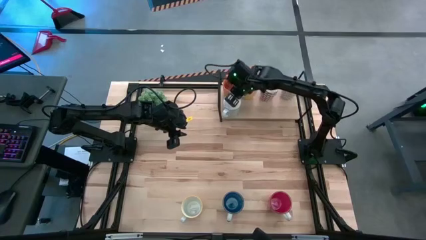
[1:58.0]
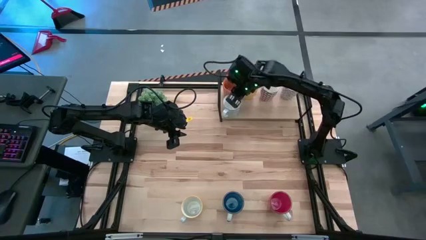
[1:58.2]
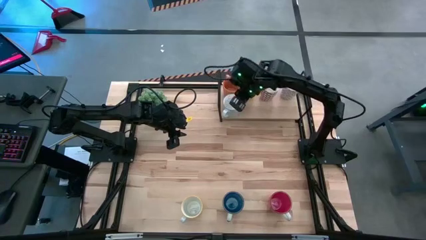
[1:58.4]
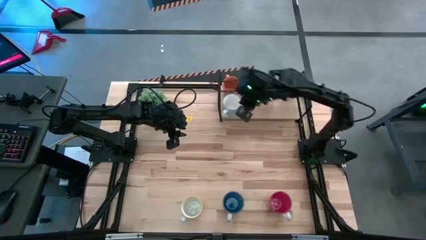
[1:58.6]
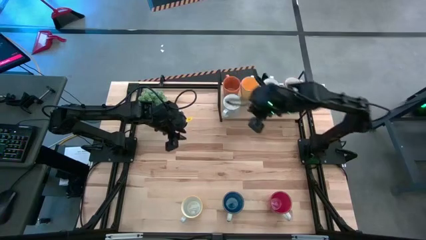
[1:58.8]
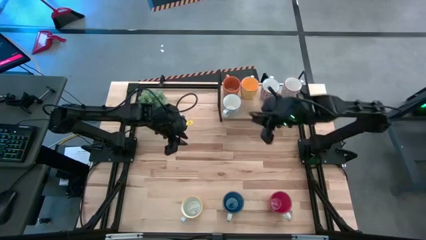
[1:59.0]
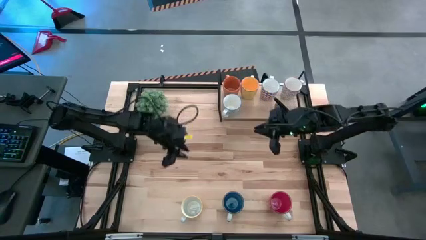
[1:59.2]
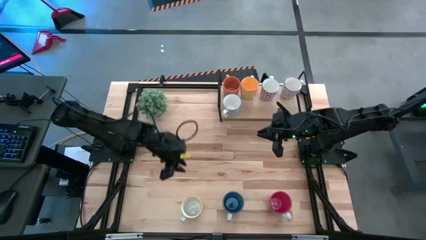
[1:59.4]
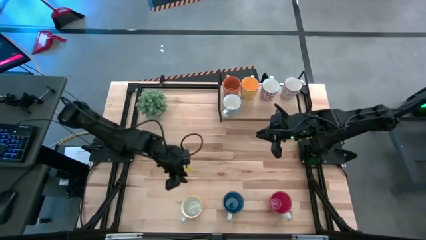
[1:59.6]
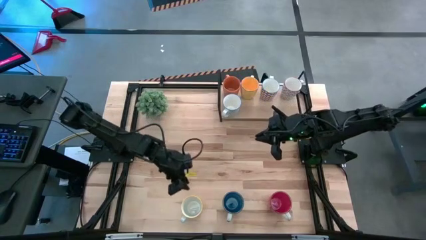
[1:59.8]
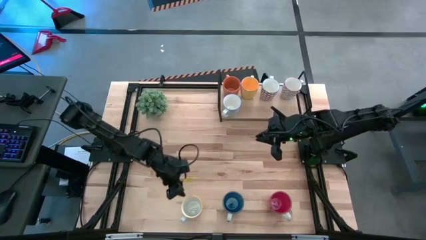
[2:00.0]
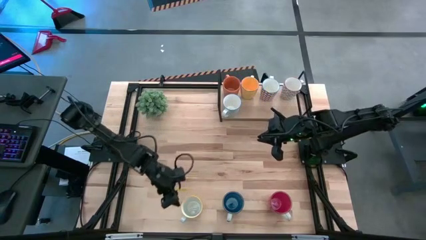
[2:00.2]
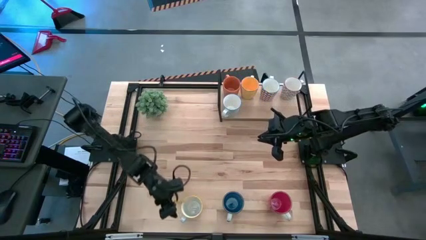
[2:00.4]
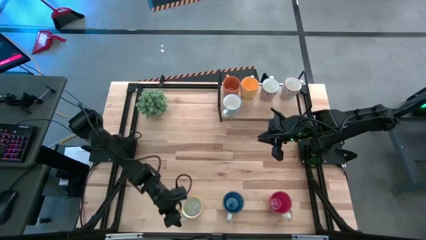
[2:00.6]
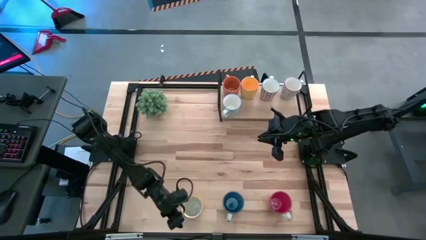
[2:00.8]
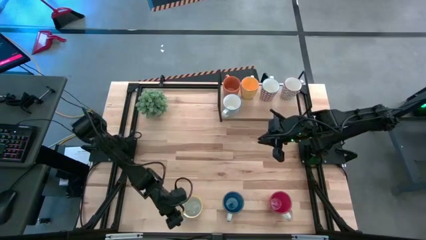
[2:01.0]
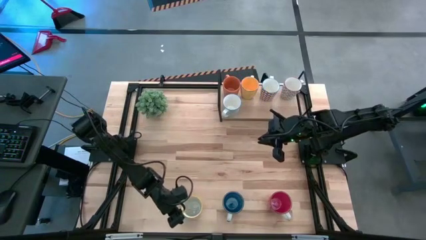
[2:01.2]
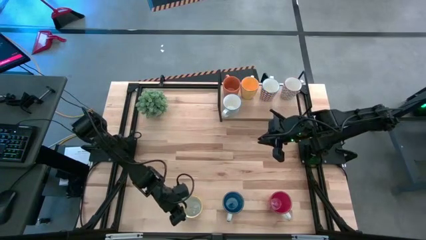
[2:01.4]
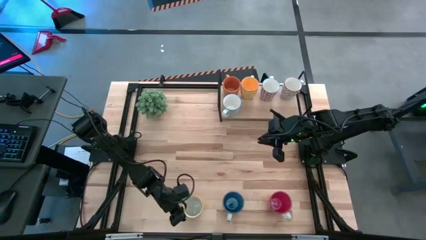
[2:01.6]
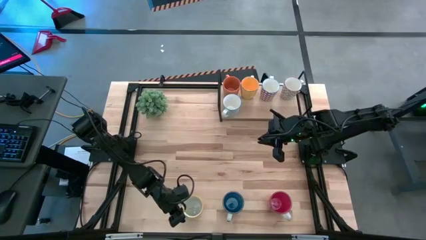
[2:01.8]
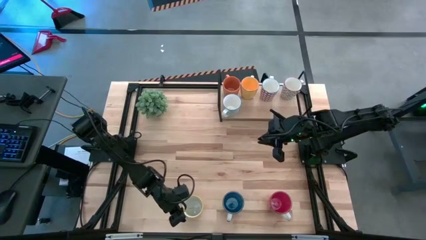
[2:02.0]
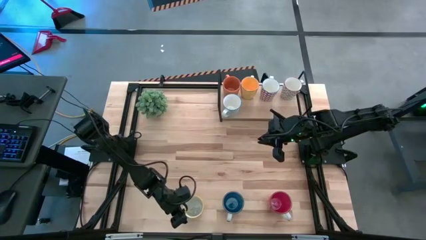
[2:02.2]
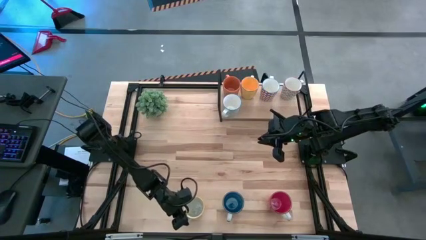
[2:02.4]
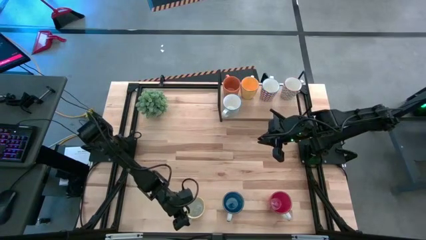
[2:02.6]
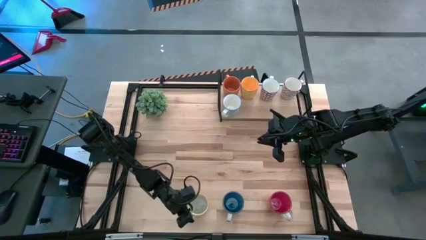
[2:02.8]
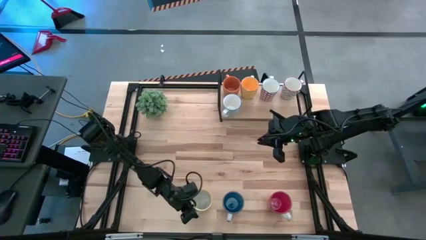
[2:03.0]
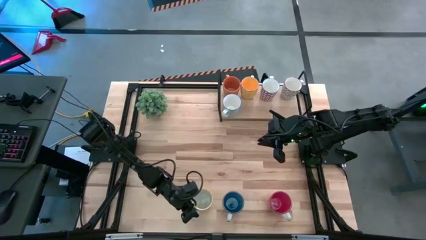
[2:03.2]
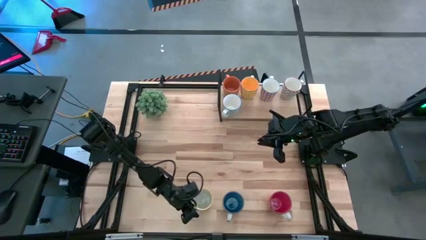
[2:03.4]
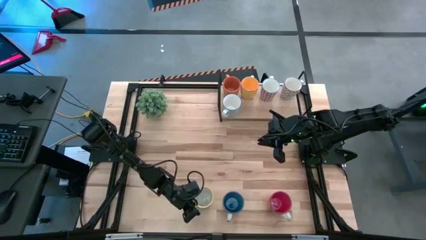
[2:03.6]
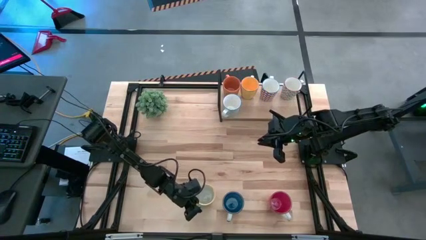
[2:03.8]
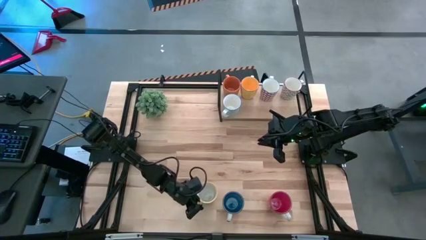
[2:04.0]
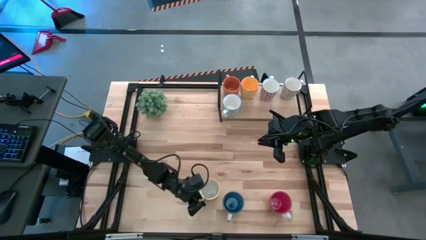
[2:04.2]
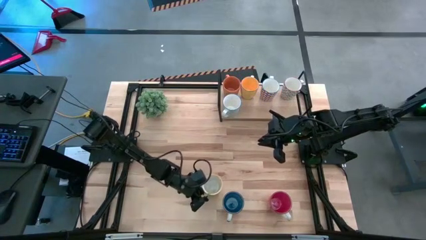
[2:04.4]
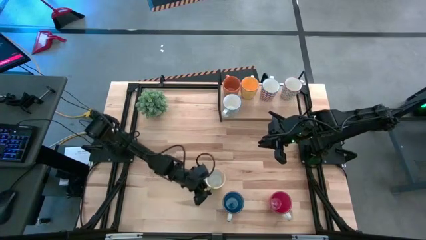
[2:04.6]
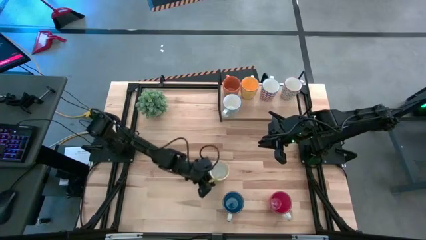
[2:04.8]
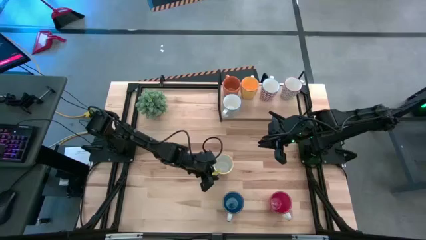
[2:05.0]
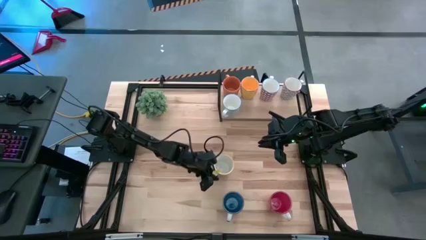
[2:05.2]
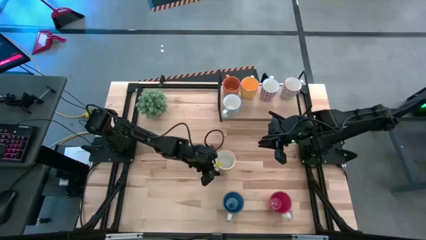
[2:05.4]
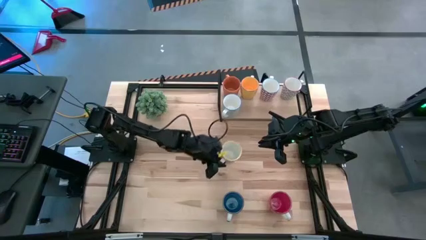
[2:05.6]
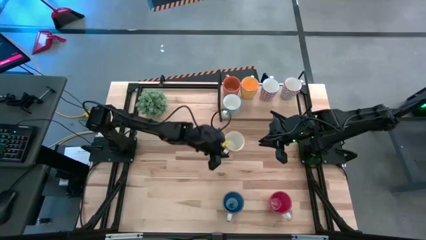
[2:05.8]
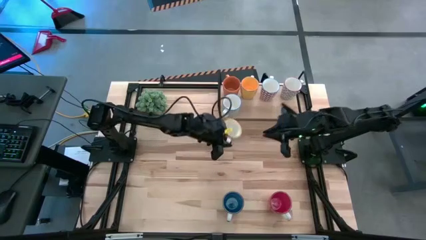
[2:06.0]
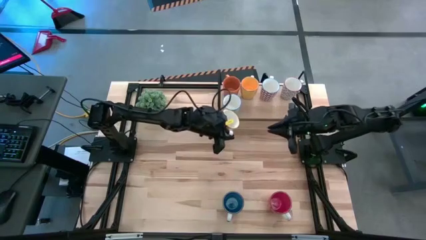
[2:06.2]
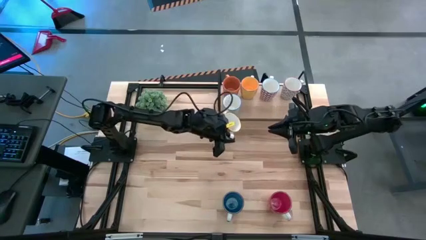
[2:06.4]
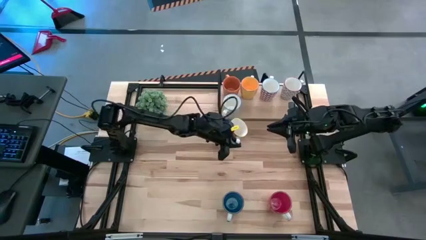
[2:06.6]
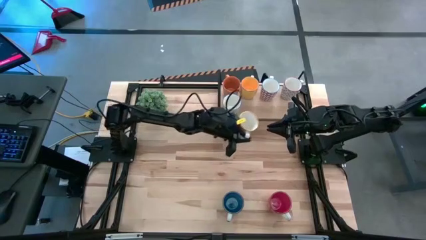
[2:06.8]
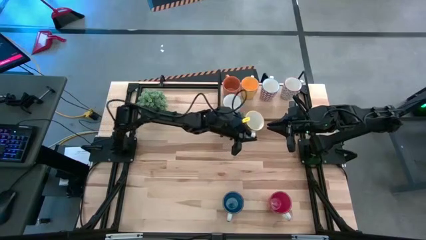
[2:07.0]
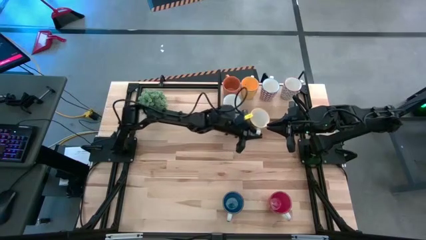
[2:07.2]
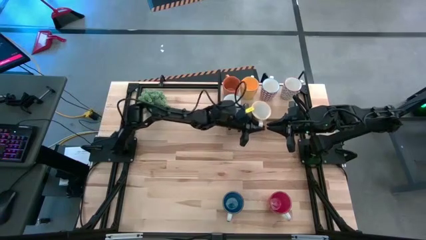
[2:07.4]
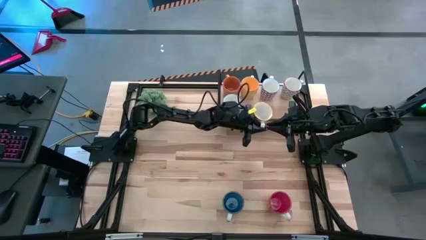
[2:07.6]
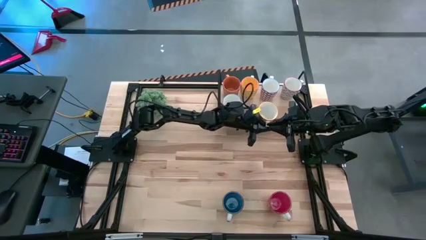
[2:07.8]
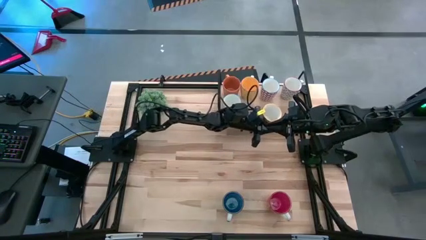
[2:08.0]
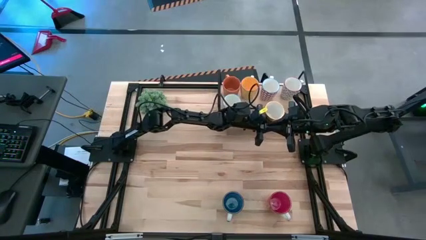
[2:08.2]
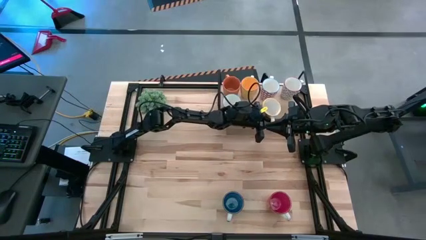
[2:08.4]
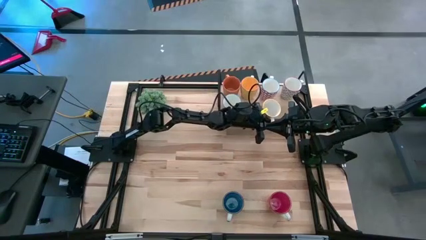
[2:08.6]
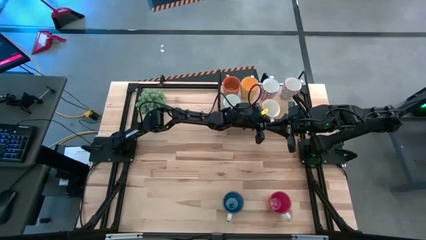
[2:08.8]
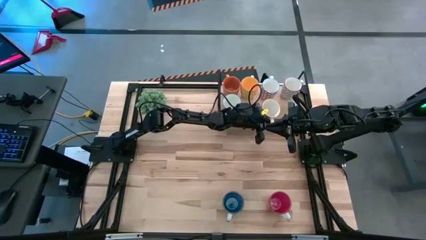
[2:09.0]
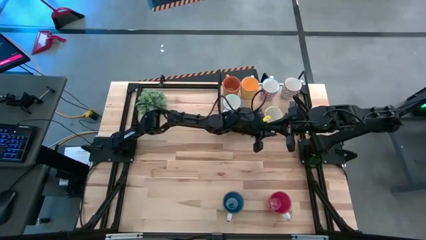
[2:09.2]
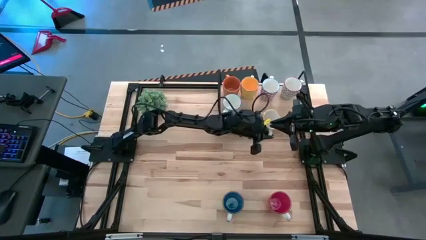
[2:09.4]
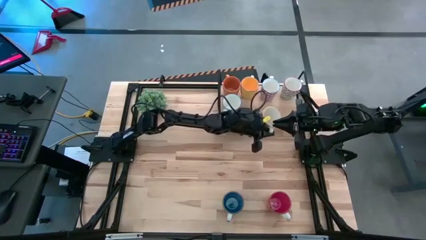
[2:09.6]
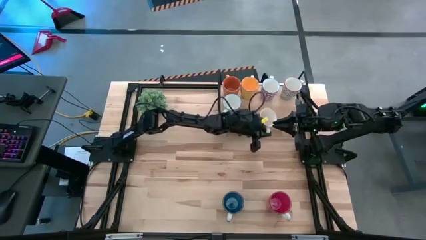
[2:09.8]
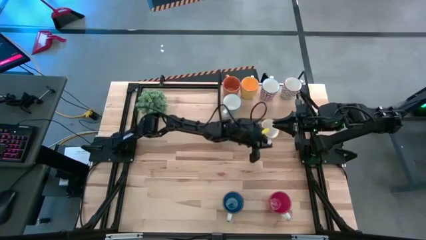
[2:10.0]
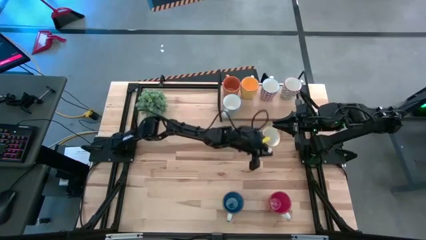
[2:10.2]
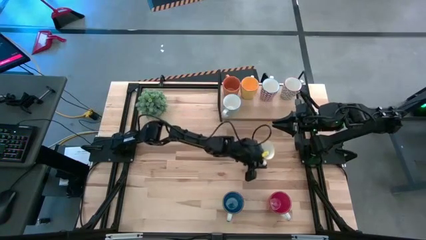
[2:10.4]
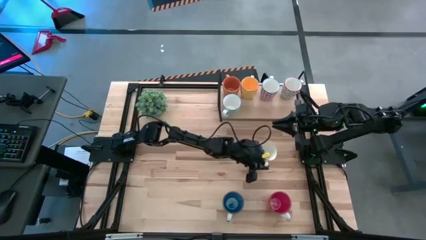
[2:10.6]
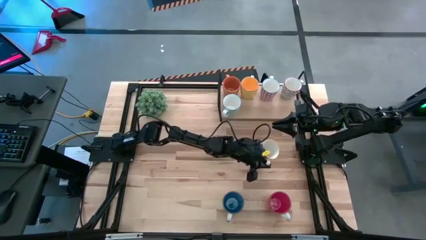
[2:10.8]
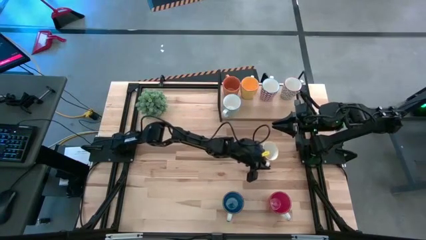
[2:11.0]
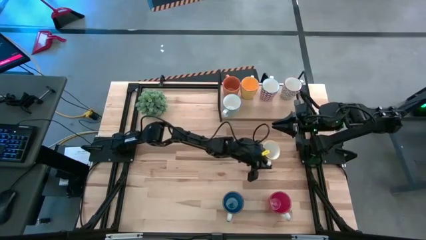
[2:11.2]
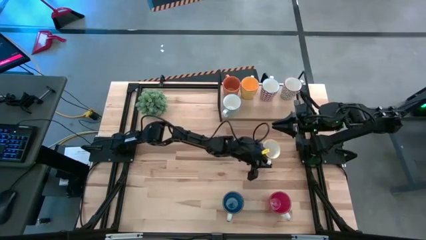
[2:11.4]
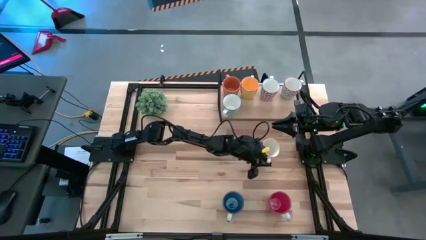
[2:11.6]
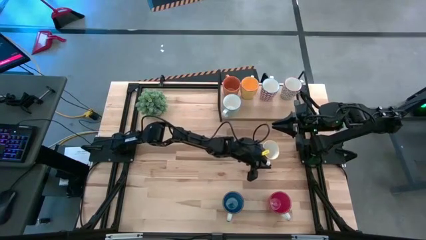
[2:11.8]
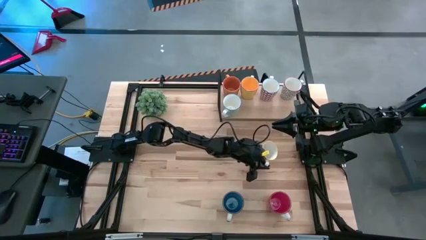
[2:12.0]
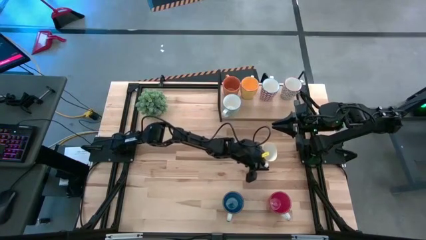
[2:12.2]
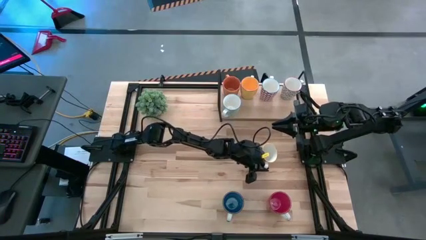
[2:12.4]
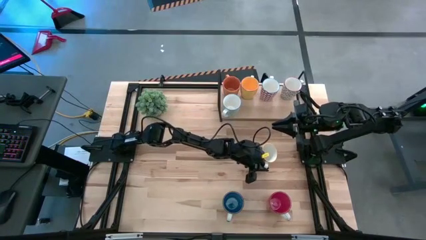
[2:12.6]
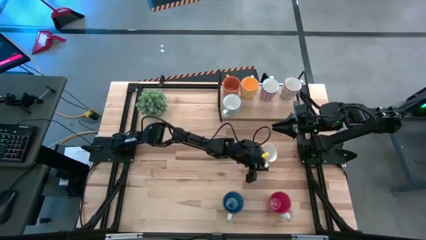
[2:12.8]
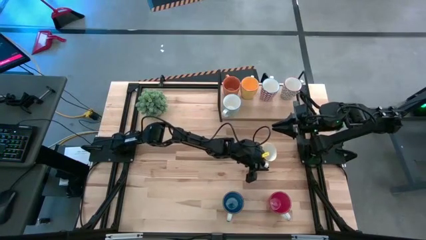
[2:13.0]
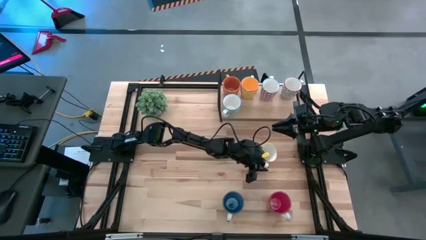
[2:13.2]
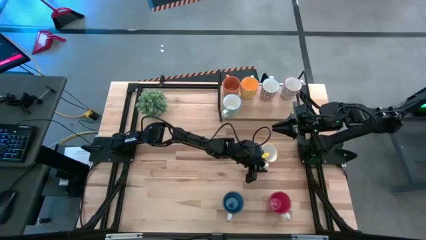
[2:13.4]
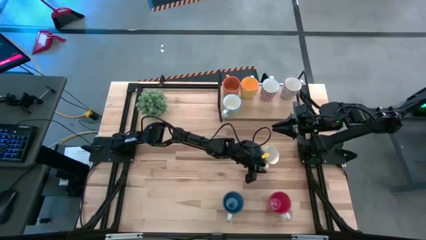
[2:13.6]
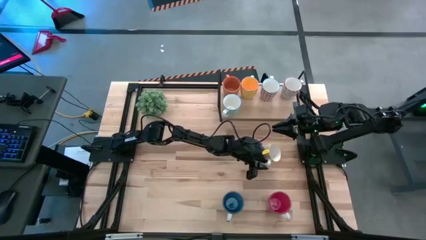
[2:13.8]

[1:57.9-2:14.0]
Task: Place coffee mugs
Put the orange patterned mug on the shelf
